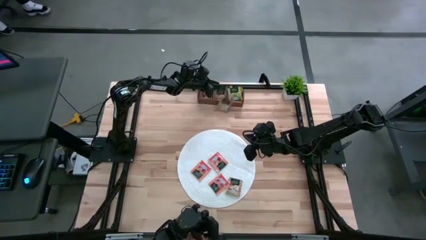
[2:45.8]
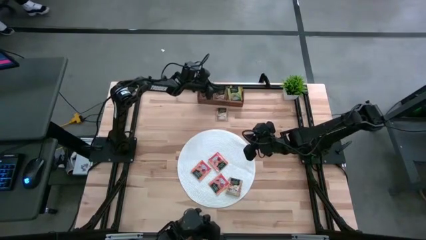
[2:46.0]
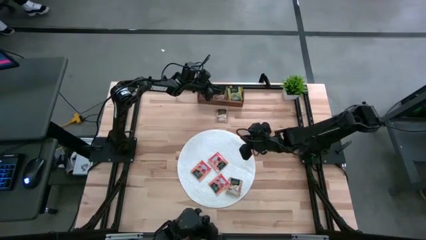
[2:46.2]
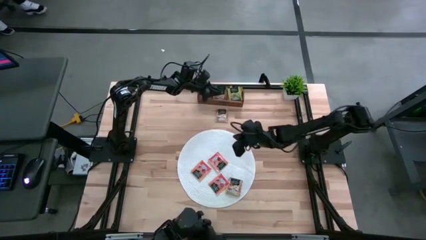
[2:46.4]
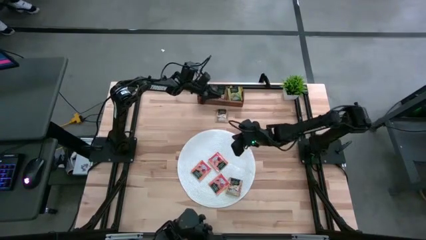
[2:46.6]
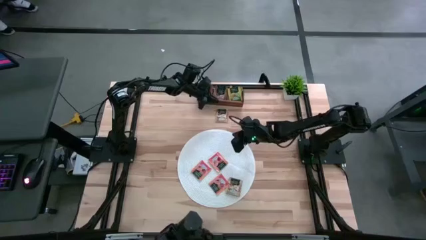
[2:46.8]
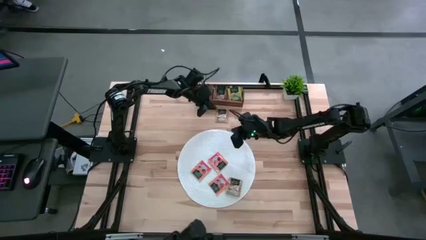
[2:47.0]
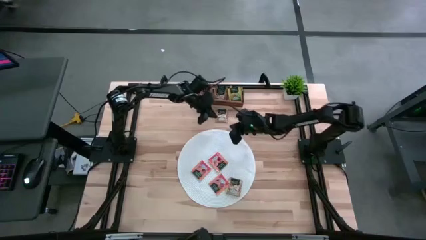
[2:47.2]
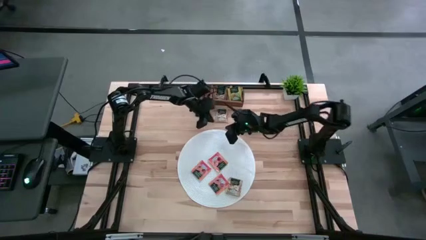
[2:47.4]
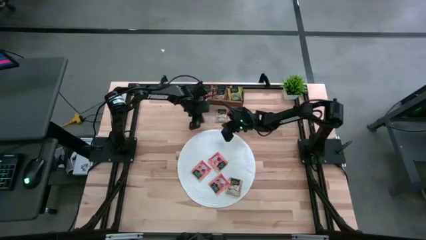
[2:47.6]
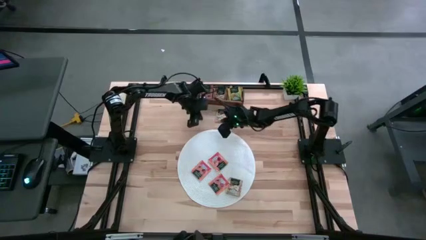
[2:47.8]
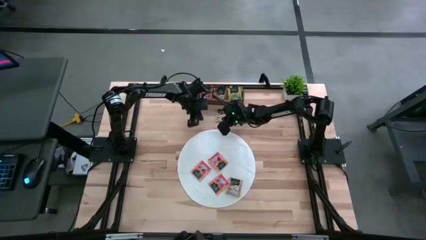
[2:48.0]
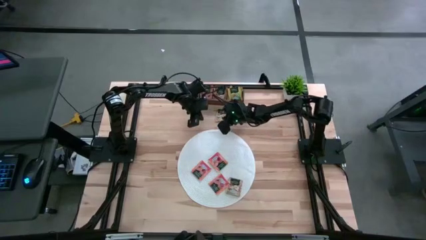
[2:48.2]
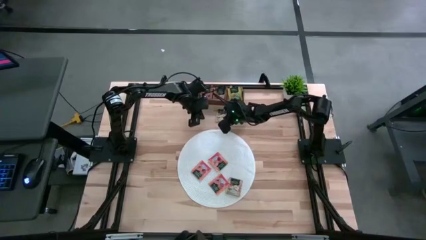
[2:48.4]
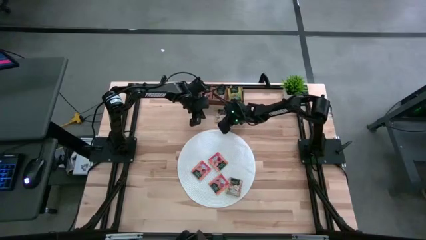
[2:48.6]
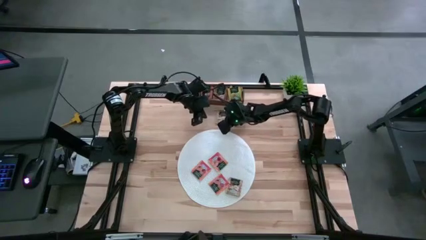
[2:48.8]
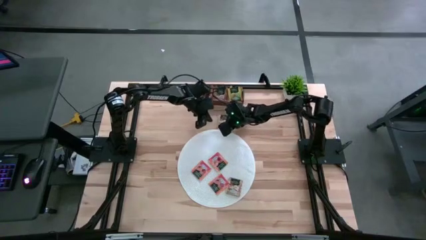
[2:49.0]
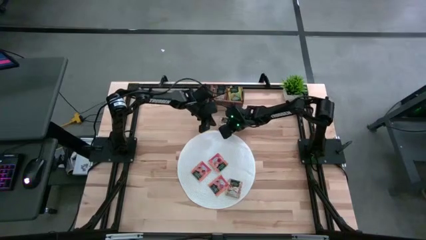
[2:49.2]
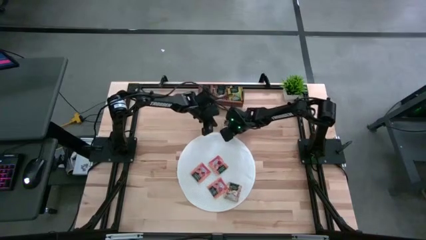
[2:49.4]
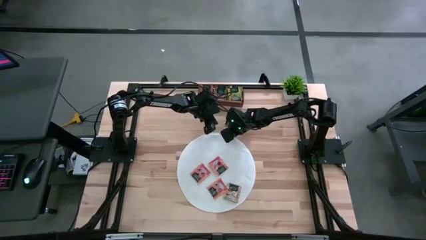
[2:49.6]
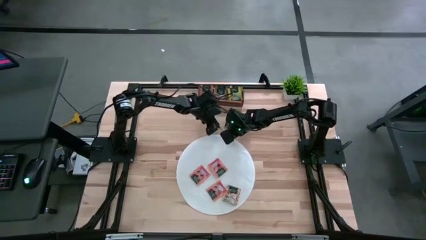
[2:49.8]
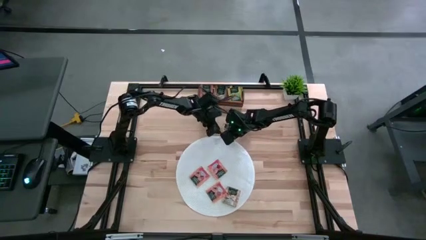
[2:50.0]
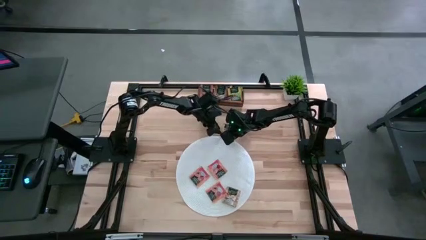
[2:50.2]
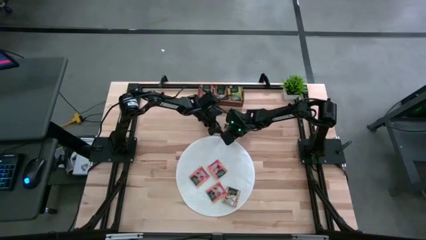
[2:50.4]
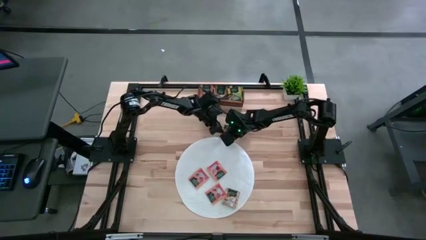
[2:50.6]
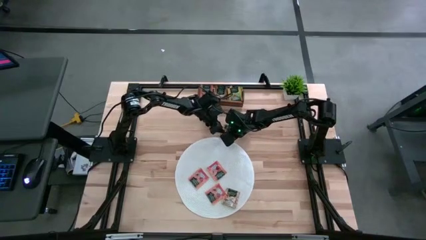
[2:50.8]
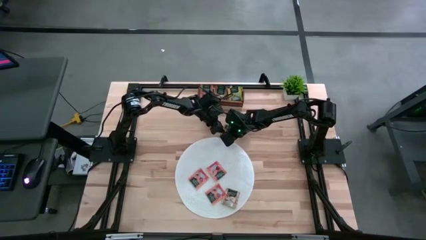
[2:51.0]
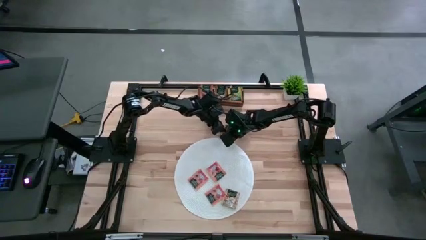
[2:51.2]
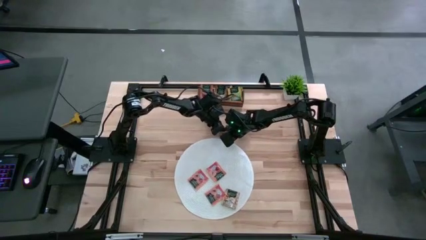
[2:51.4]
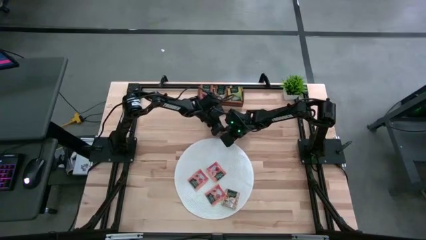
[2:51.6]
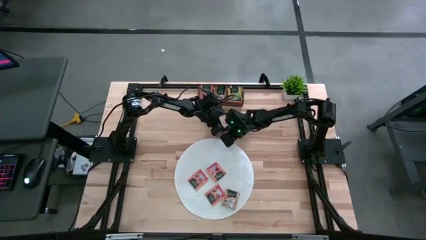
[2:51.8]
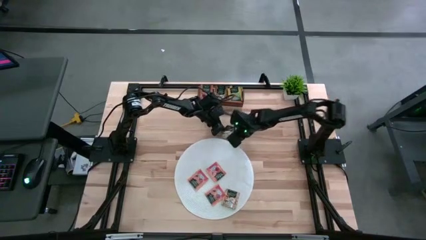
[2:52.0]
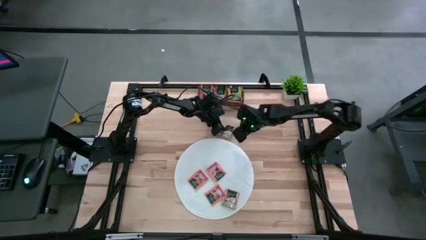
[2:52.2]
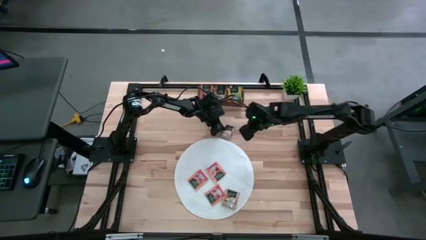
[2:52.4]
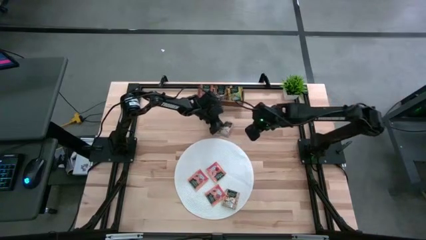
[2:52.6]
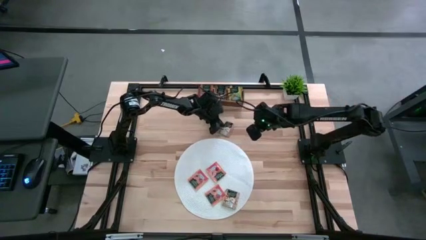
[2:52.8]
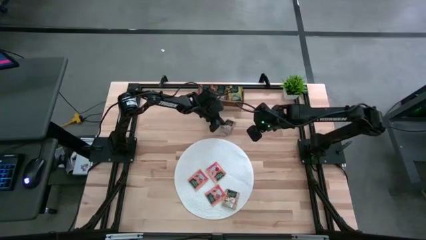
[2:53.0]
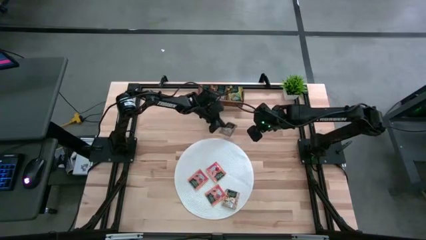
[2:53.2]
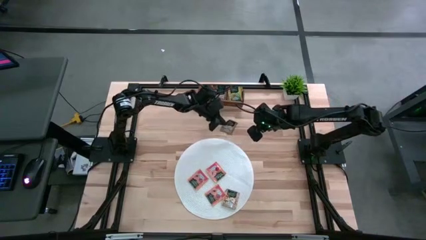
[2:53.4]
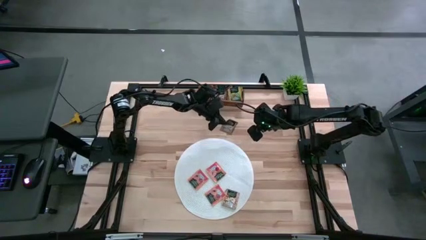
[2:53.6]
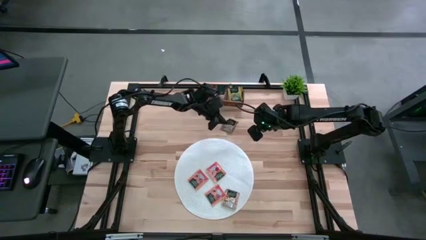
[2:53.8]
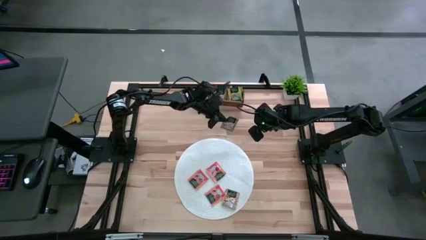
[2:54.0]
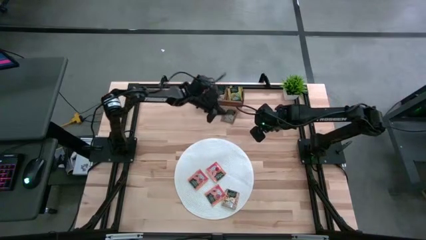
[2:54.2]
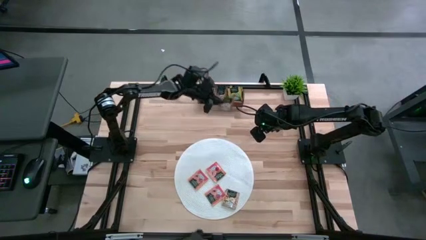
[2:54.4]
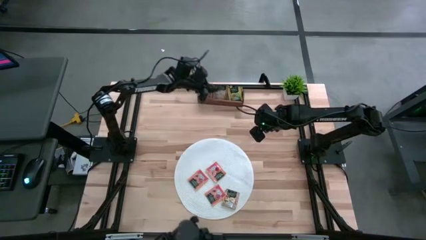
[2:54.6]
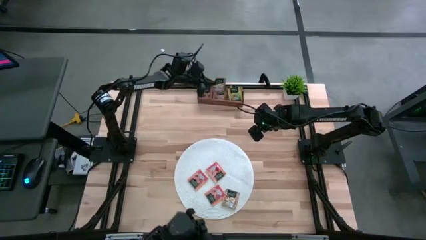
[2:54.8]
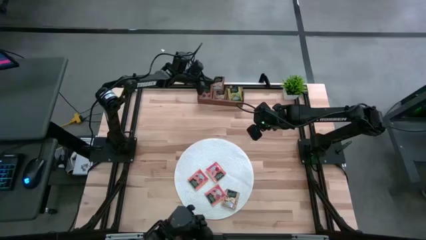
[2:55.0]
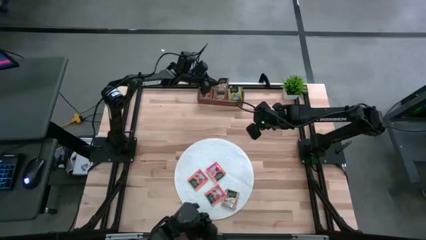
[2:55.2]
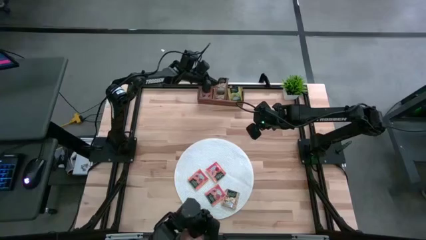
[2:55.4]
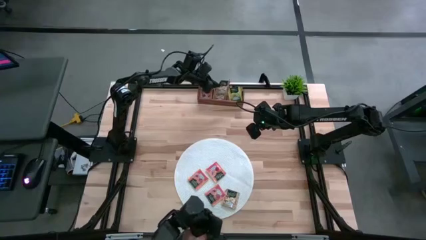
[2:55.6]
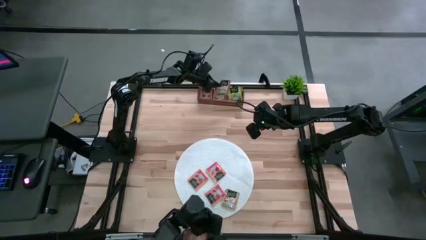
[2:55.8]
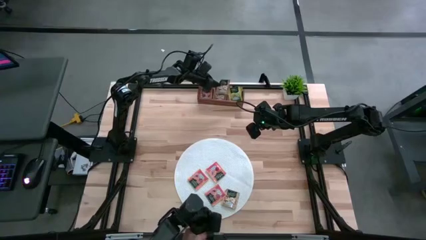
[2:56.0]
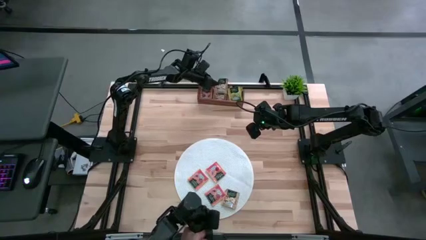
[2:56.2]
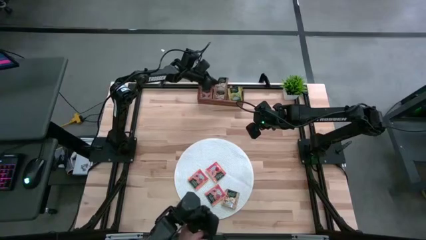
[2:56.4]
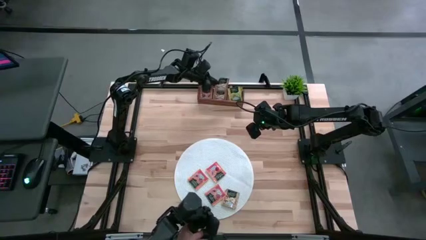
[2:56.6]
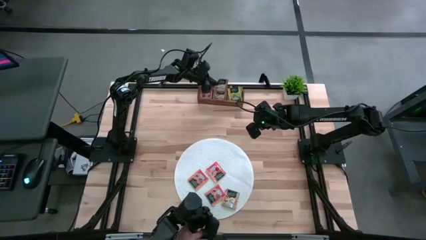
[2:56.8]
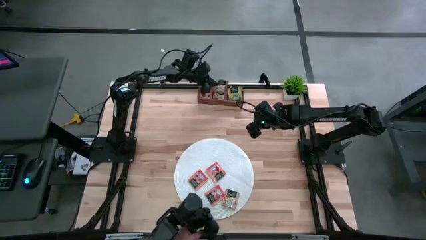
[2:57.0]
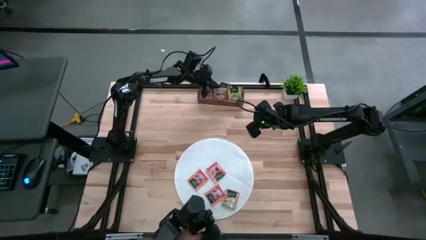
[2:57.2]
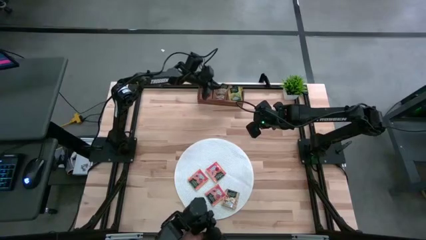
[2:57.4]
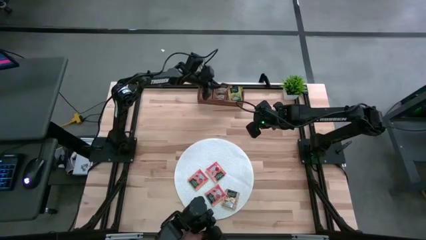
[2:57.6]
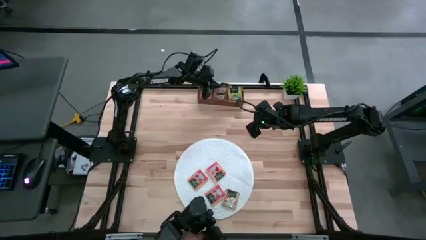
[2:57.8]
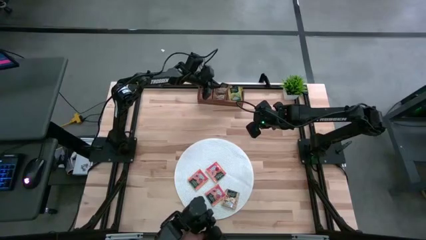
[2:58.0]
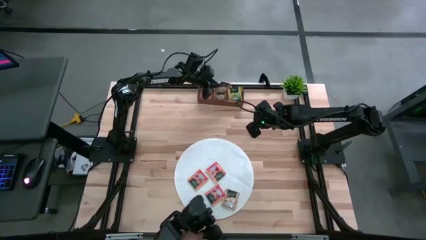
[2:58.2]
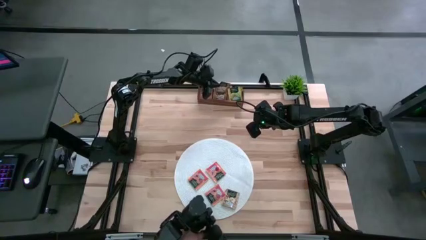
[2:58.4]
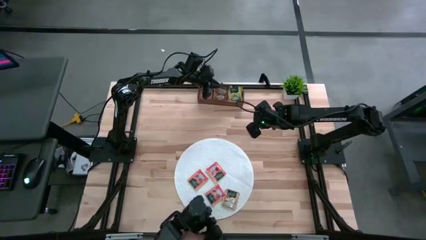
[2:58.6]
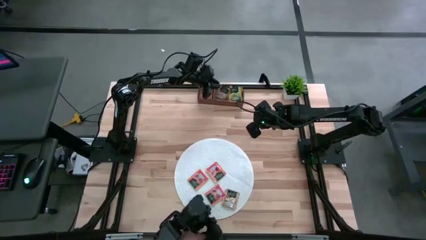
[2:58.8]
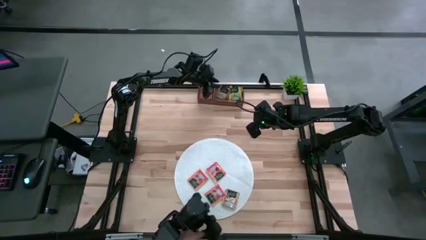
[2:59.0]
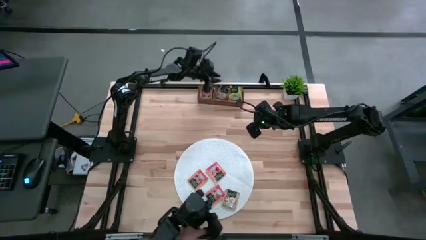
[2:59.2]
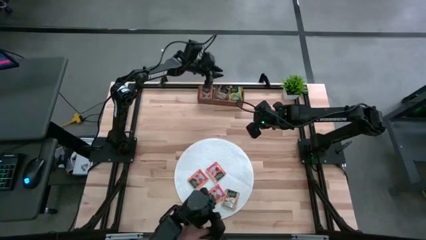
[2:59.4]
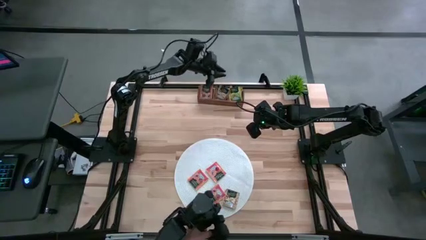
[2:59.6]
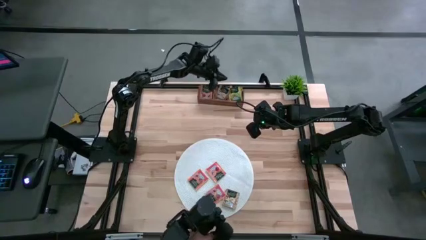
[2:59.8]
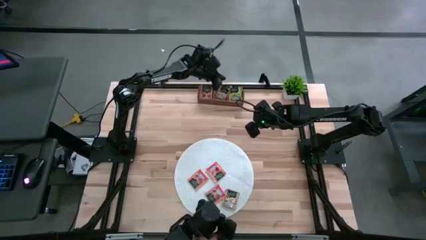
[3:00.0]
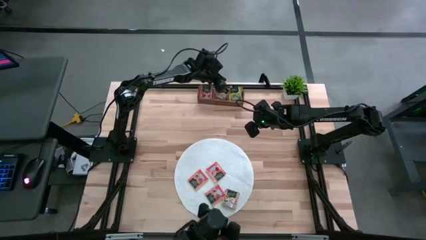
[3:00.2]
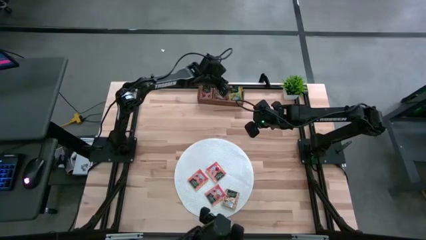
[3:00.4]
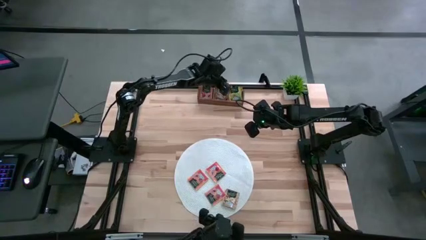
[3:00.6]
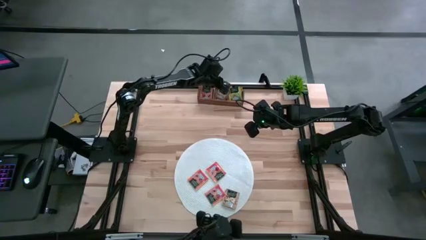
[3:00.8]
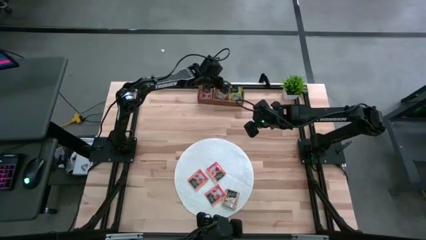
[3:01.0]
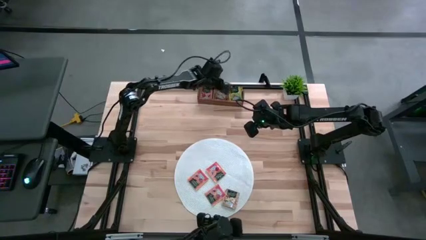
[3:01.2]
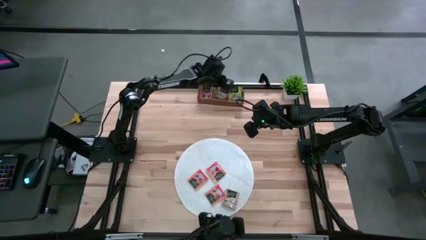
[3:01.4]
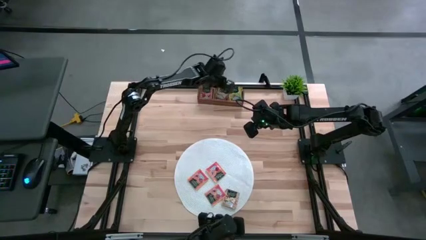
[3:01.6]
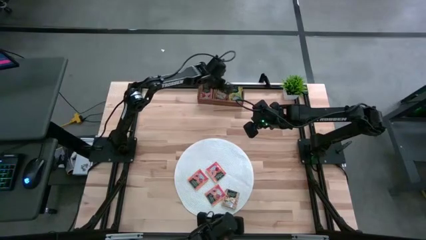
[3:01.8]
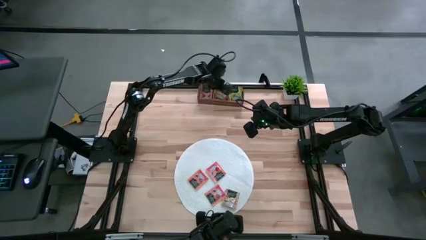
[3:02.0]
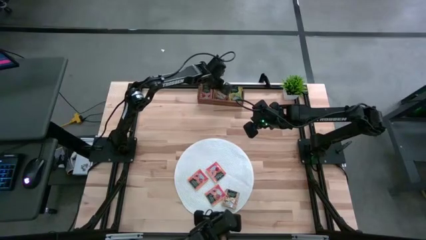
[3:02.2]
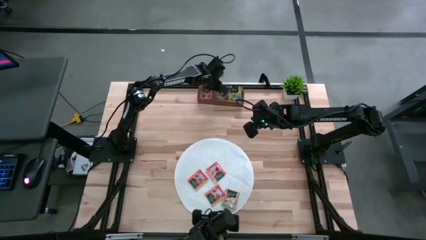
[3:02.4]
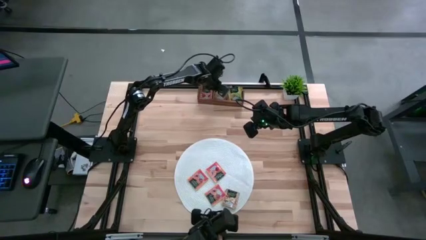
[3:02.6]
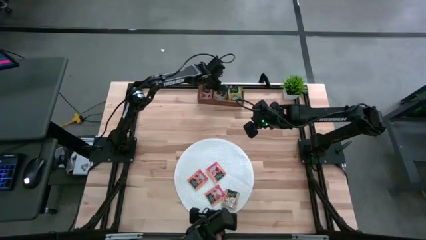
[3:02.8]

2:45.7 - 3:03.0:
Task: Pick & Place Tea
Put the brown tea bag into the middle section of the wooden organizer
